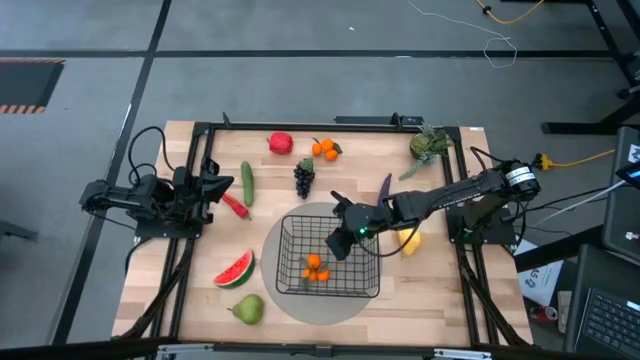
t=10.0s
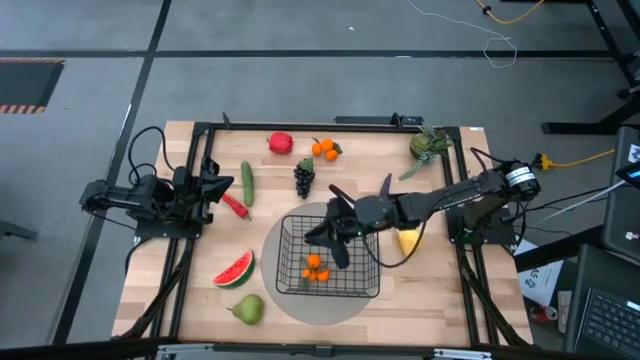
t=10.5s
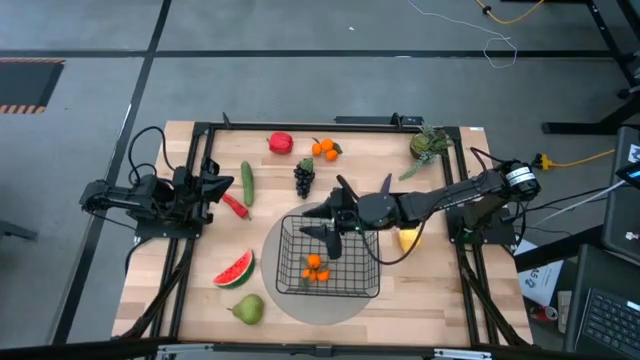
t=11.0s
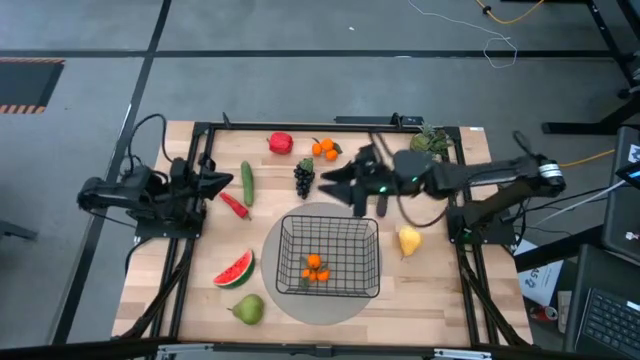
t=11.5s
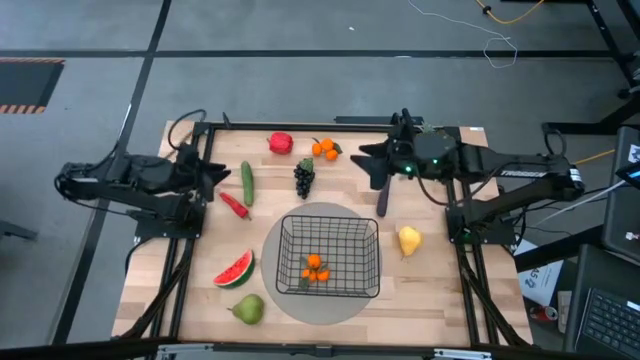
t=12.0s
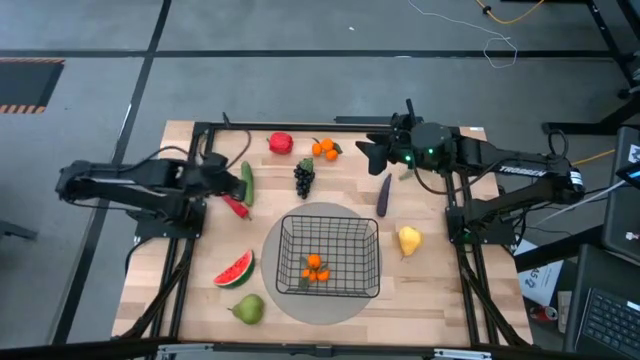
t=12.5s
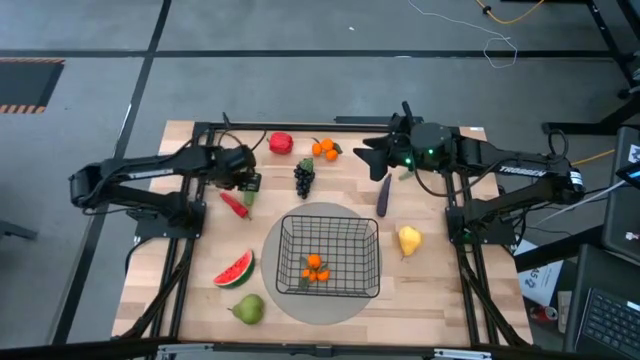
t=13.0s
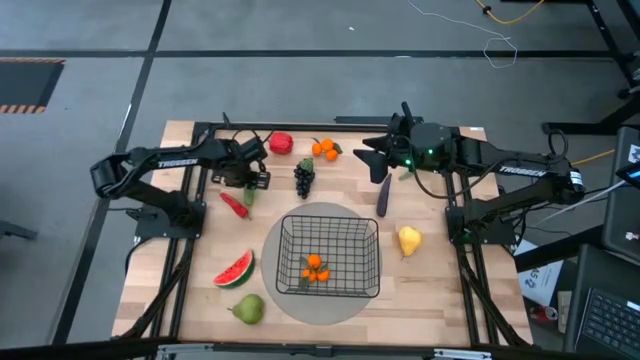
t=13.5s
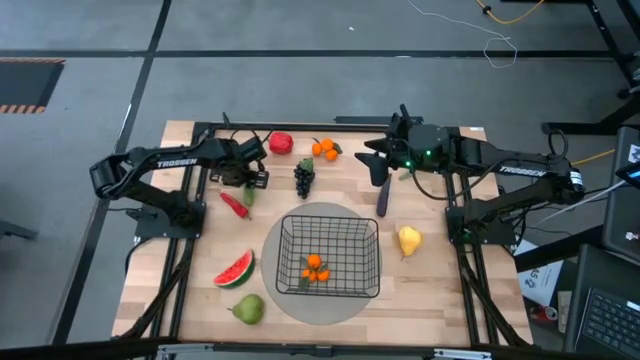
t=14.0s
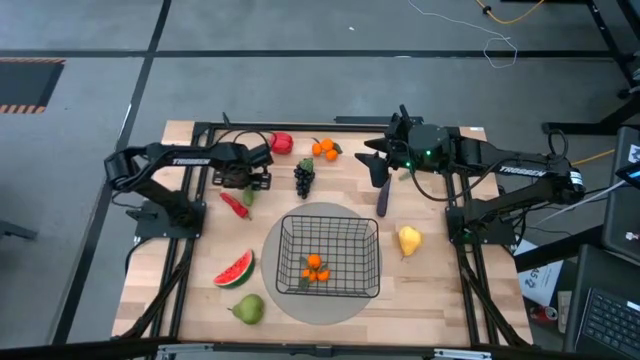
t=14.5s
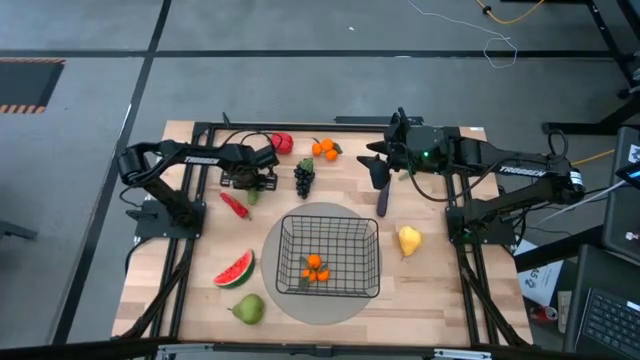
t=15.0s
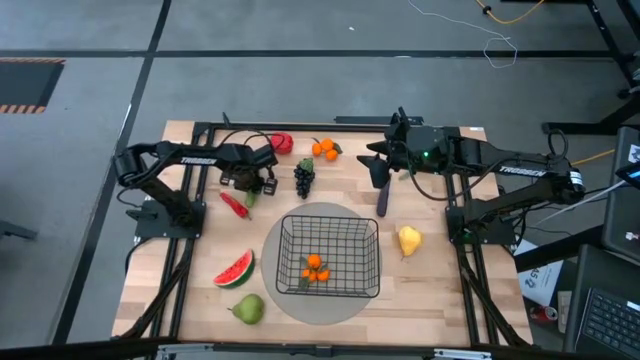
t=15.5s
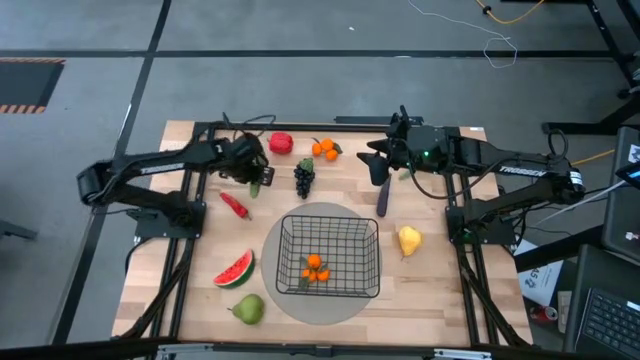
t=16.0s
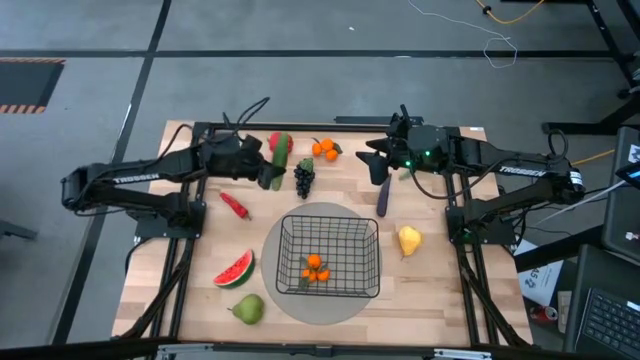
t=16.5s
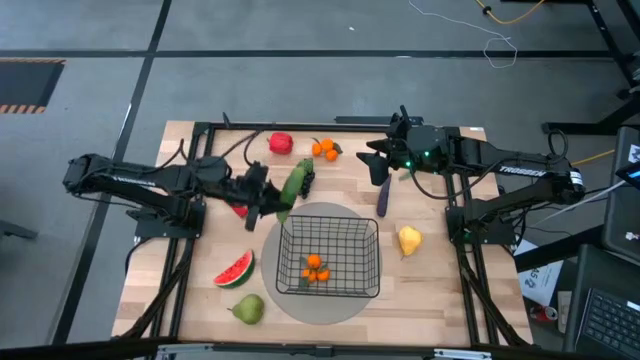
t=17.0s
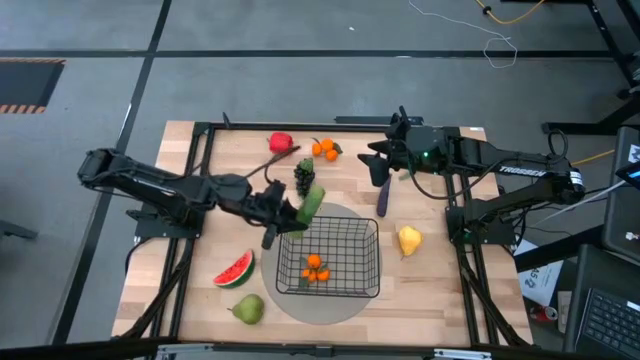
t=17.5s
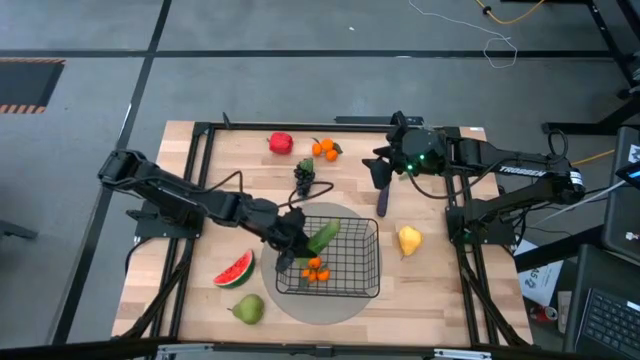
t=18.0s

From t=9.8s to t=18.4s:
Task: Build produce basket
Put the green cucumber into the black wire basket

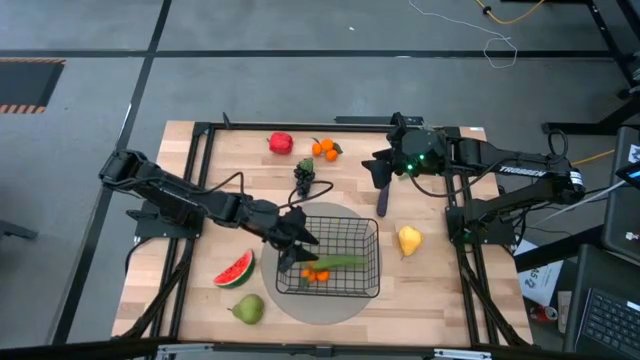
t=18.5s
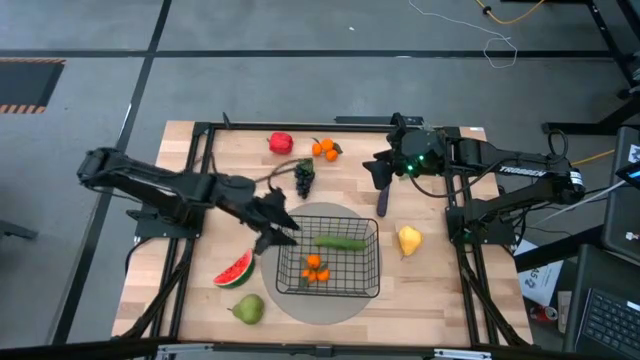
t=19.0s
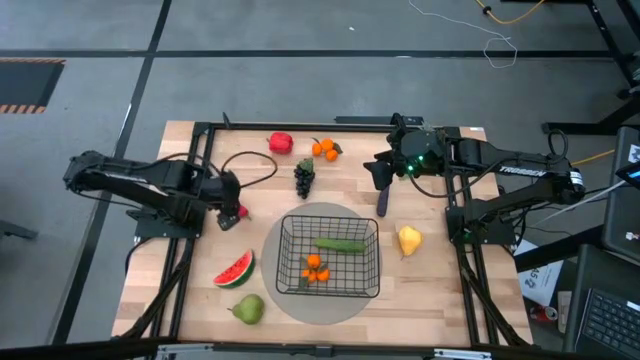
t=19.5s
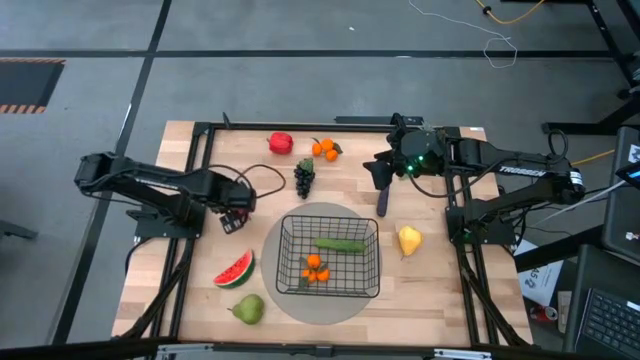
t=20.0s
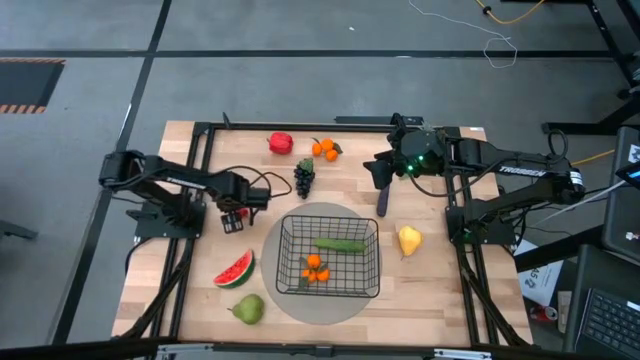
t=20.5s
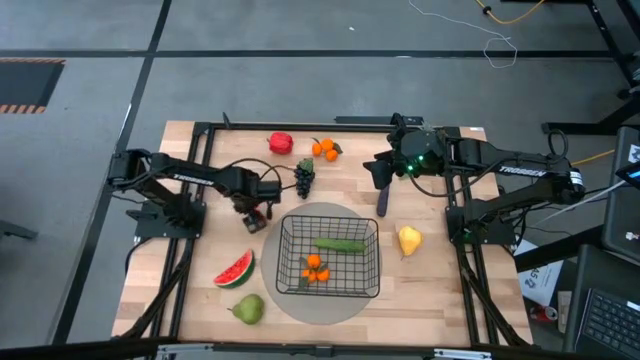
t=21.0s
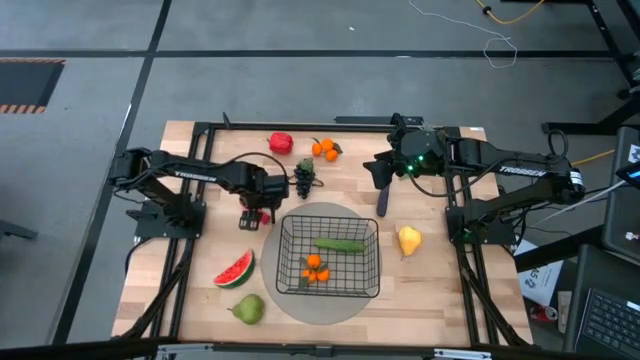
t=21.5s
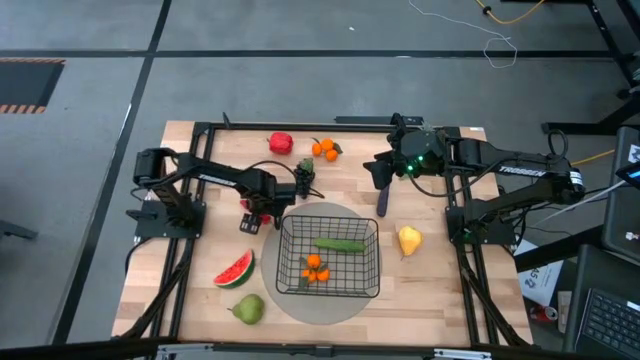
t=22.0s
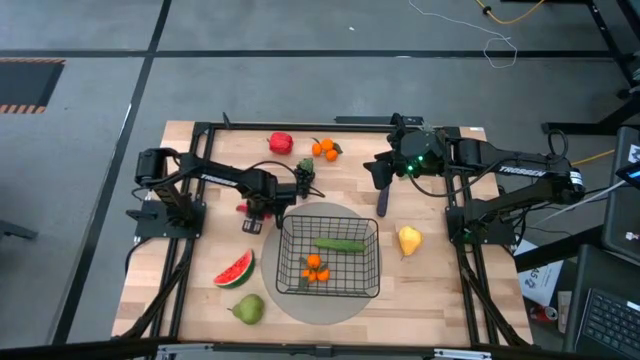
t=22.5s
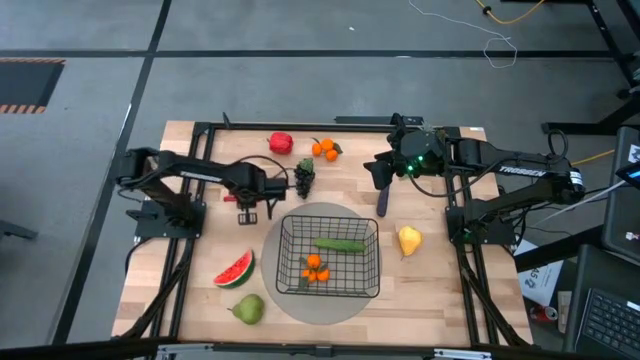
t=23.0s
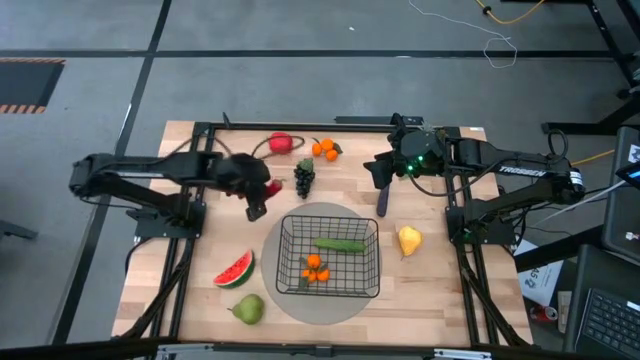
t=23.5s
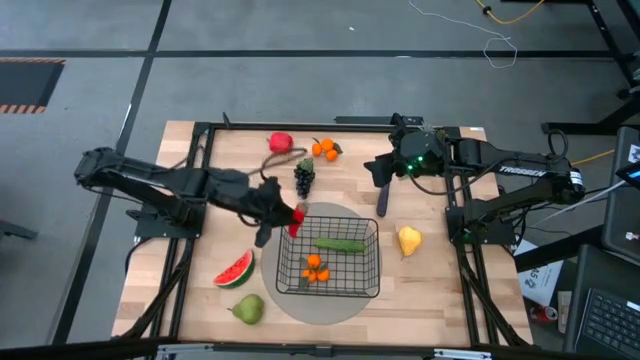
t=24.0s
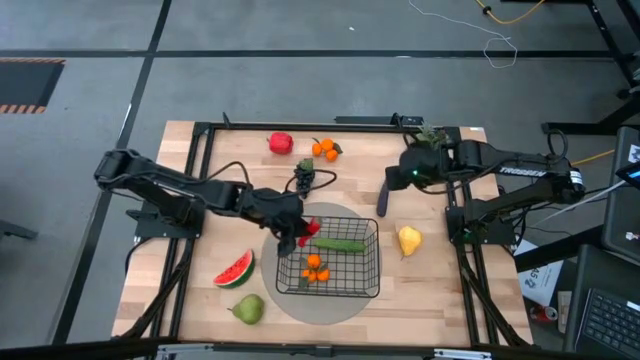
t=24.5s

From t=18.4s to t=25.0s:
Put the red chili pepper into the black wire basket

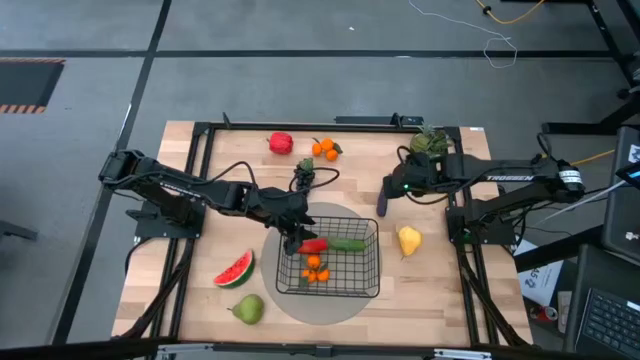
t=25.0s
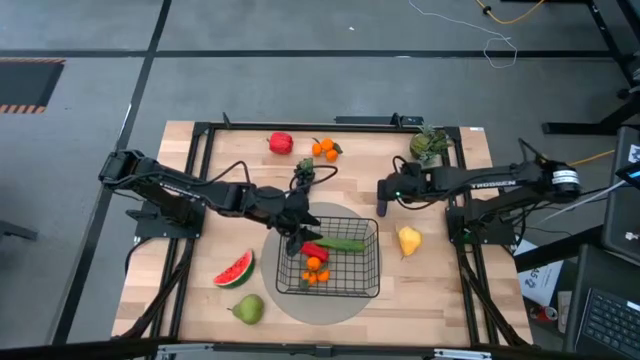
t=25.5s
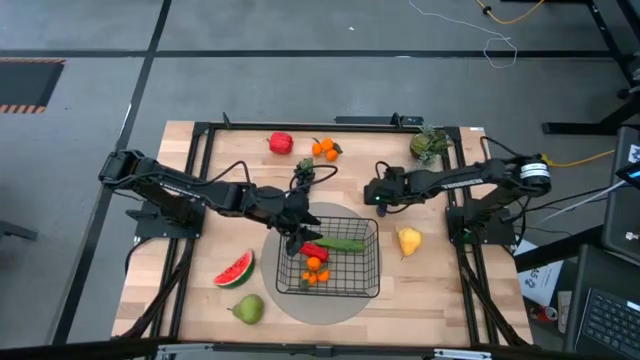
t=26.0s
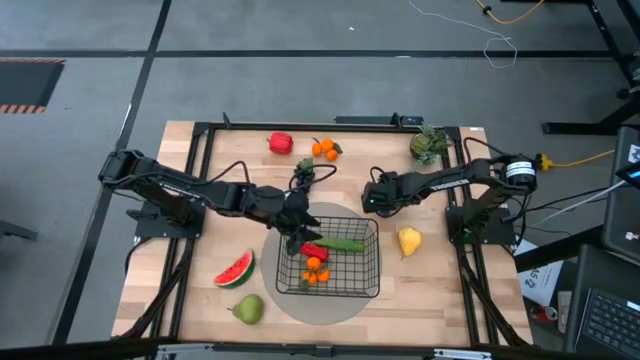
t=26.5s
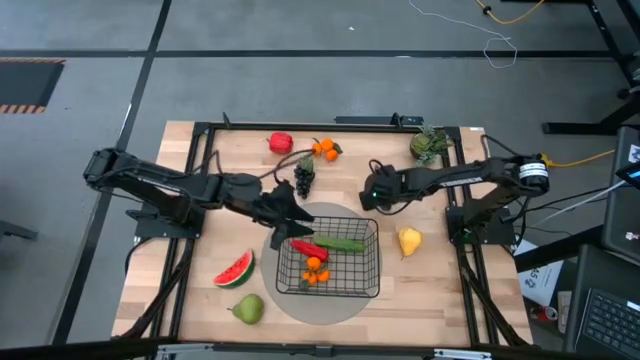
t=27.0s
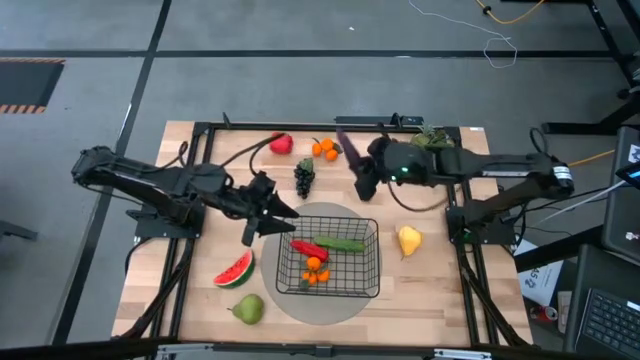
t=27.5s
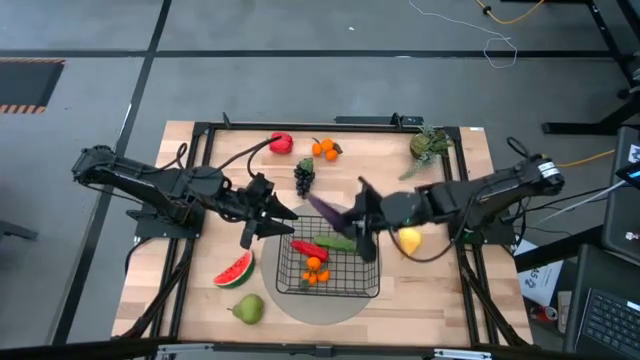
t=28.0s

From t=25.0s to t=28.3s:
Put the purple eggplant into the black wire basket

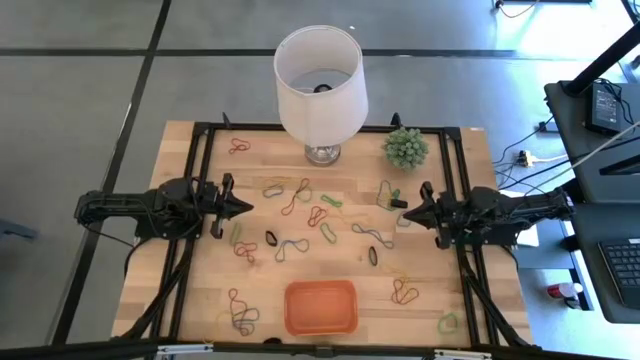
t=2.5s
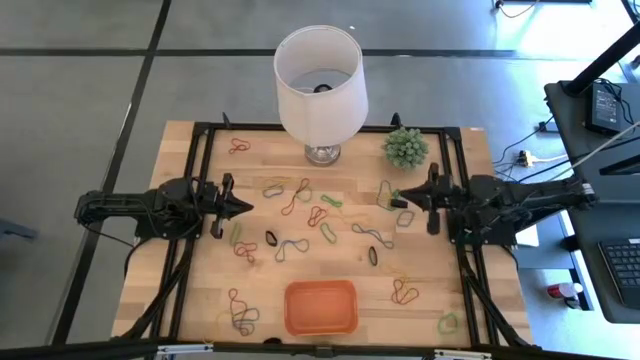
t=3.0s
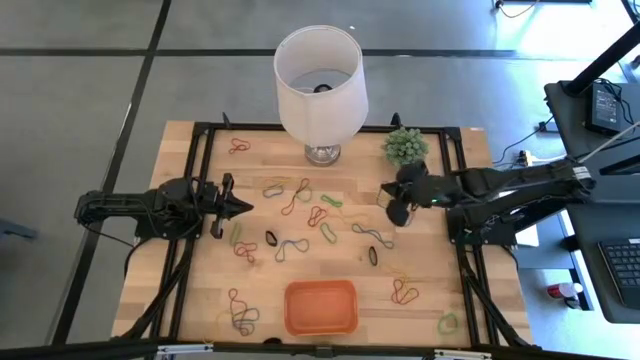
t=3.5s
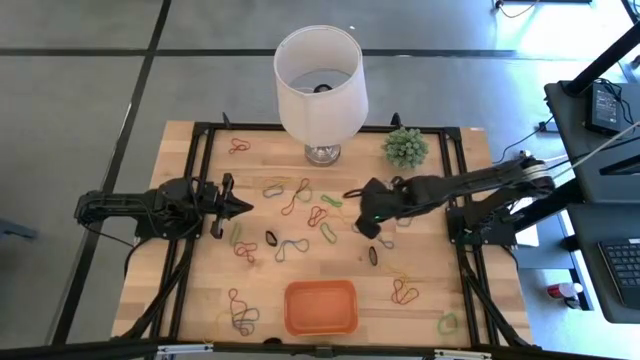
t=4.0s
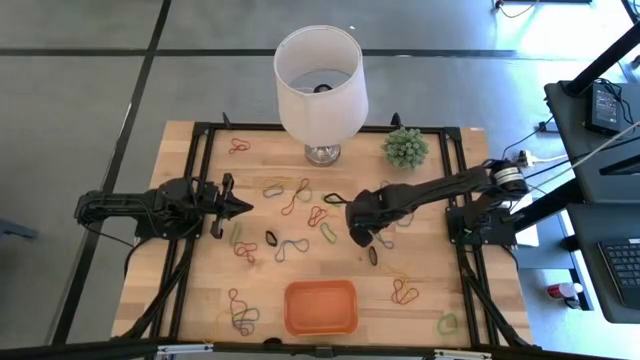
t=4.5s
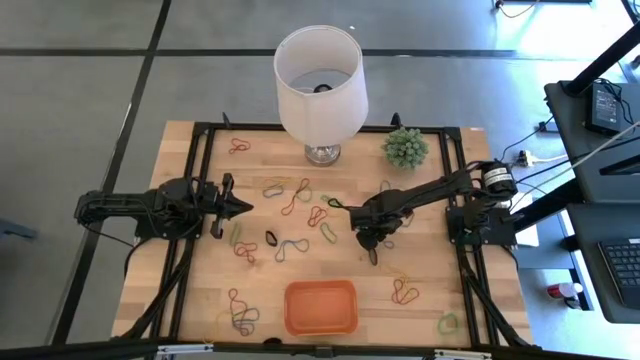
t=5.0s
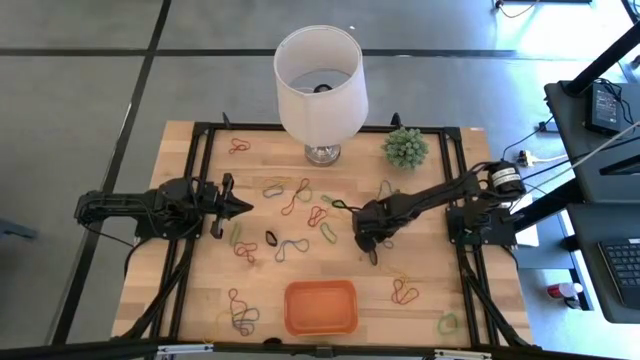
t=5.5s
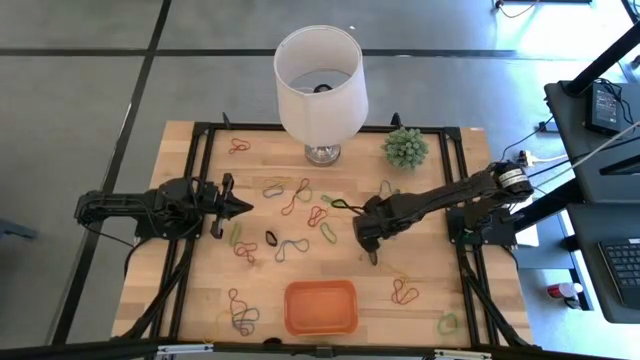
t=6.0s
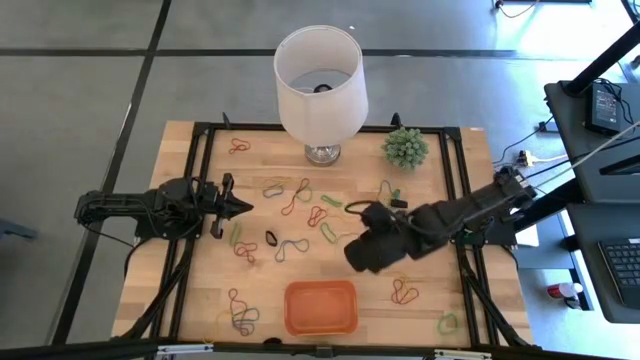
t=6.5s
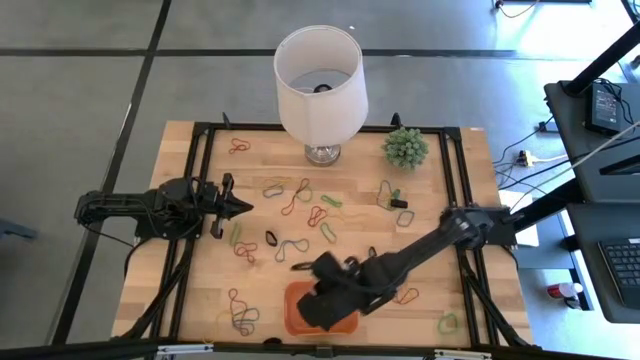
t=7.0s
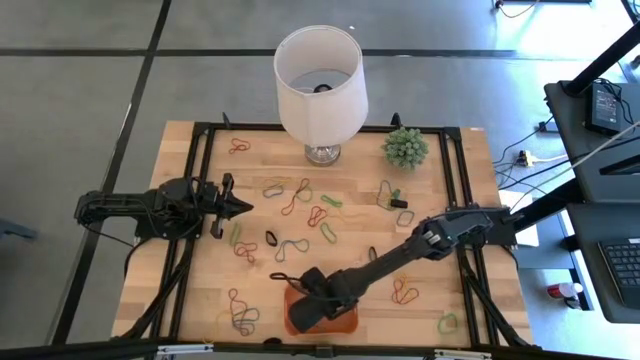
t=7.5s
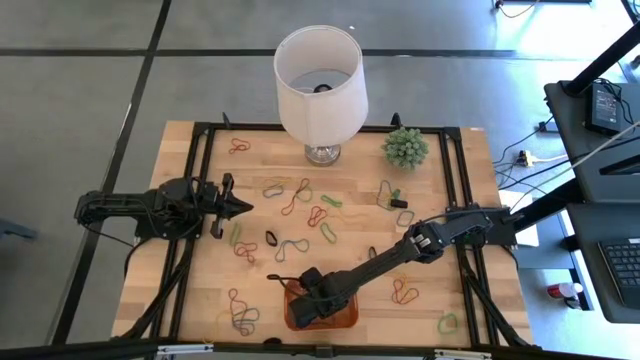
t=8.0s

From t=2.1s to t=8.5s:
Task: Pick and place rubber bands into bin
Put the blue rubber band into the orange bin
